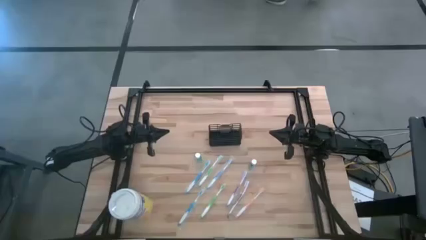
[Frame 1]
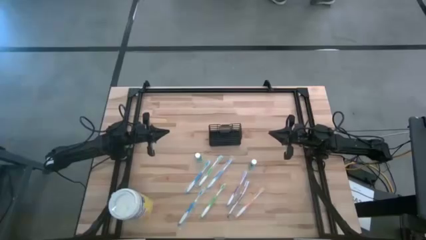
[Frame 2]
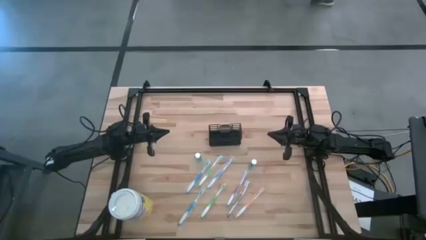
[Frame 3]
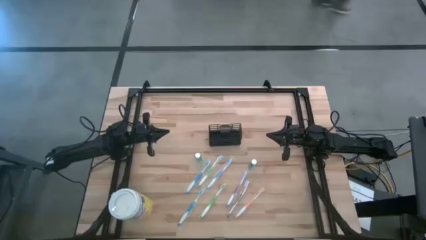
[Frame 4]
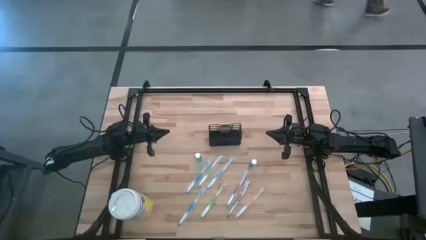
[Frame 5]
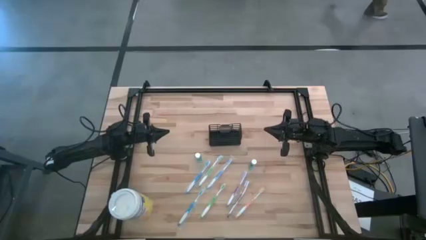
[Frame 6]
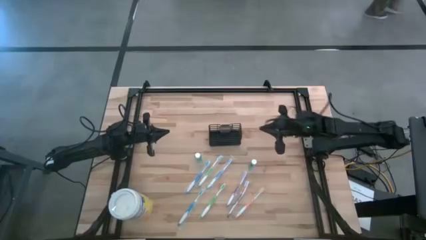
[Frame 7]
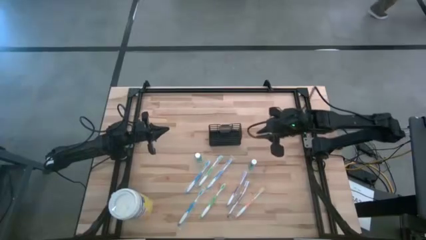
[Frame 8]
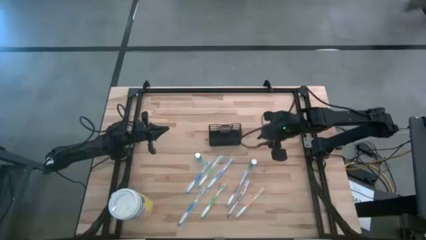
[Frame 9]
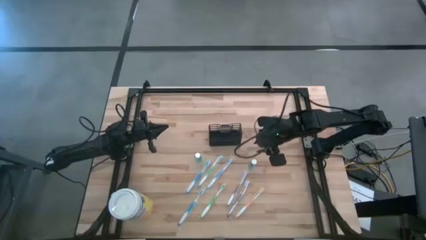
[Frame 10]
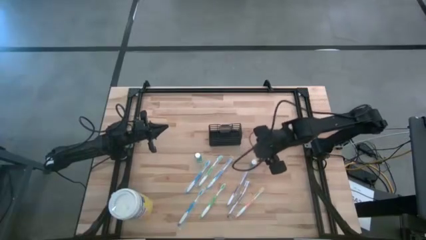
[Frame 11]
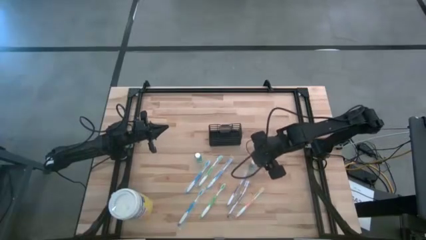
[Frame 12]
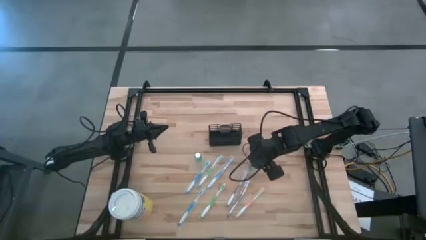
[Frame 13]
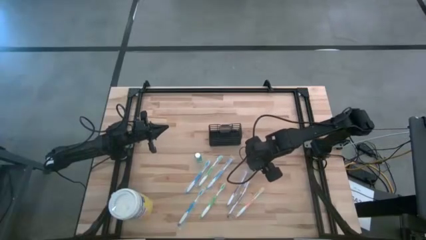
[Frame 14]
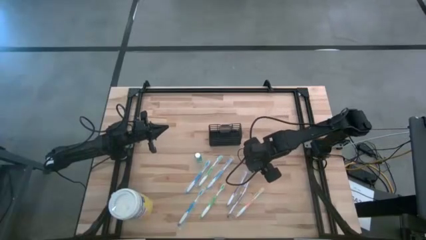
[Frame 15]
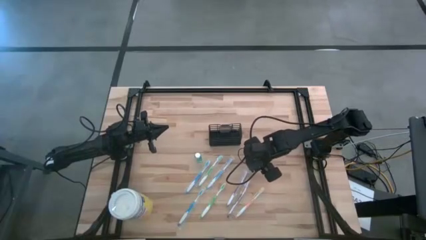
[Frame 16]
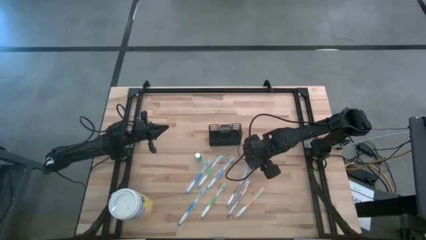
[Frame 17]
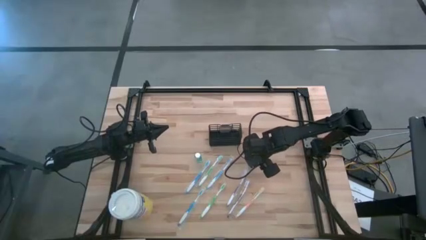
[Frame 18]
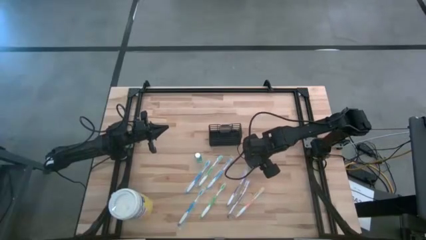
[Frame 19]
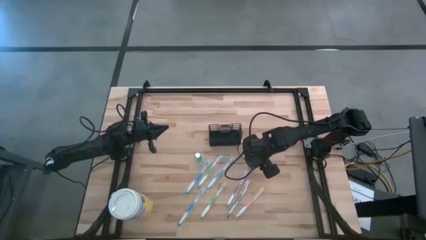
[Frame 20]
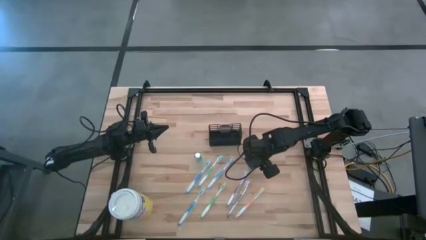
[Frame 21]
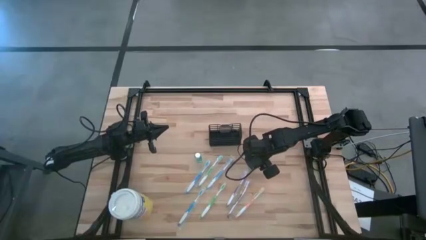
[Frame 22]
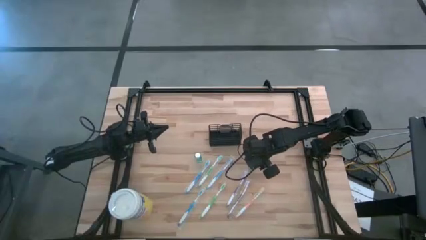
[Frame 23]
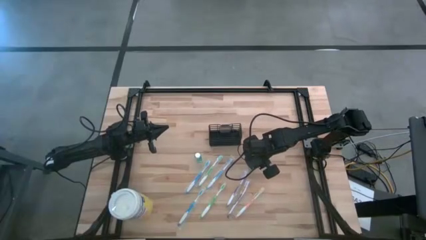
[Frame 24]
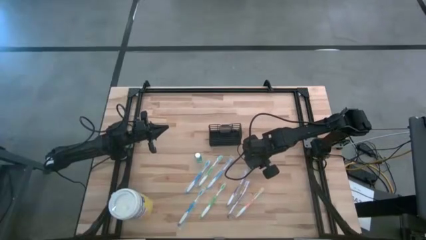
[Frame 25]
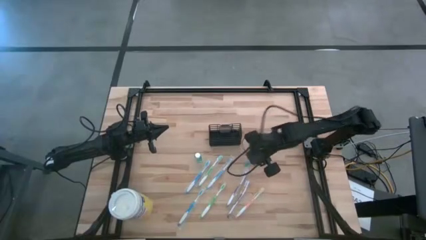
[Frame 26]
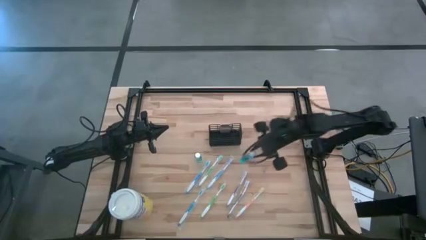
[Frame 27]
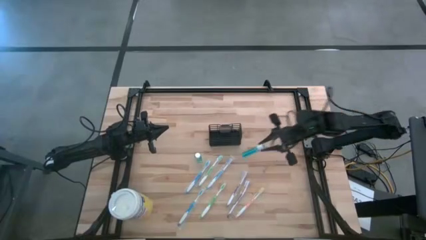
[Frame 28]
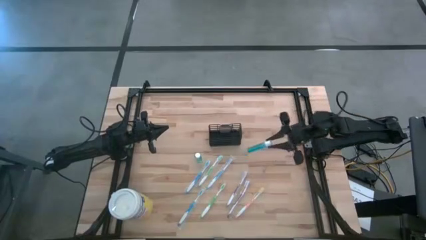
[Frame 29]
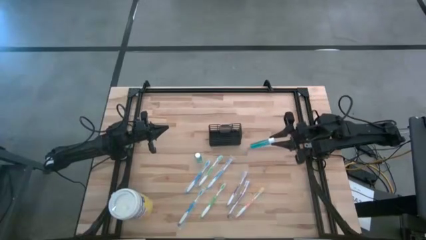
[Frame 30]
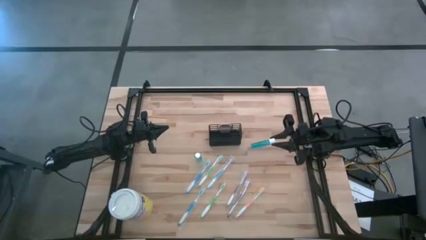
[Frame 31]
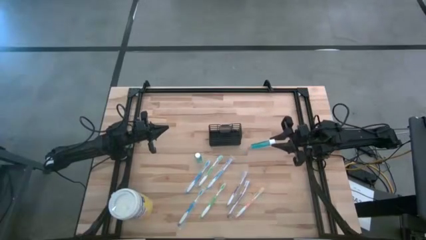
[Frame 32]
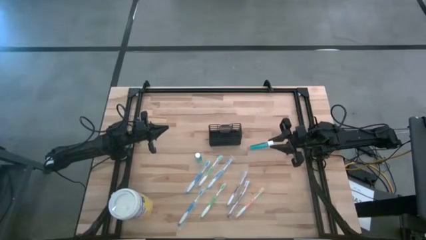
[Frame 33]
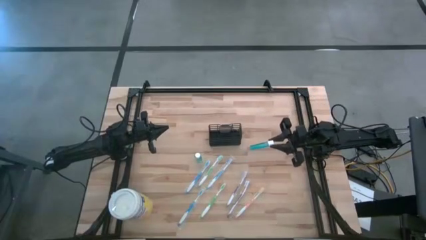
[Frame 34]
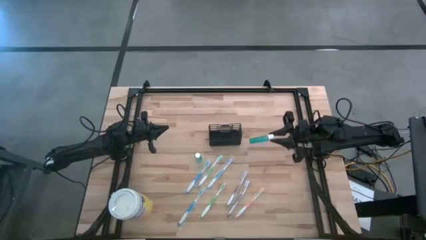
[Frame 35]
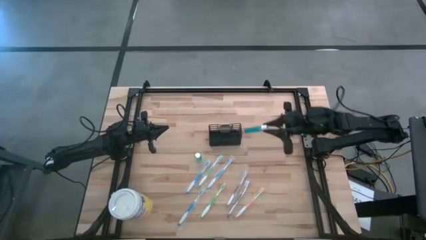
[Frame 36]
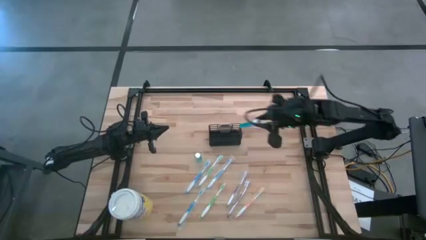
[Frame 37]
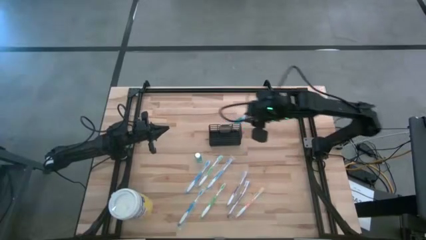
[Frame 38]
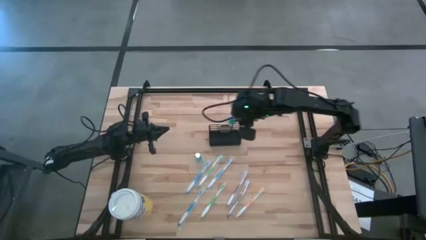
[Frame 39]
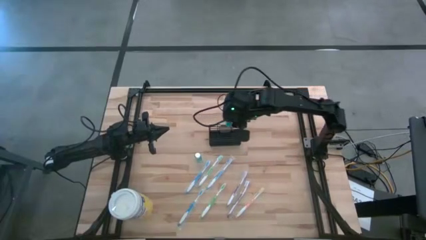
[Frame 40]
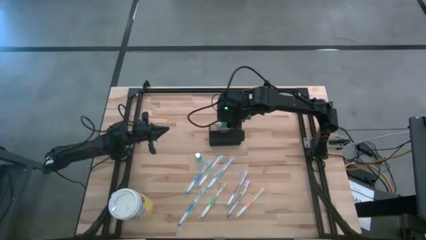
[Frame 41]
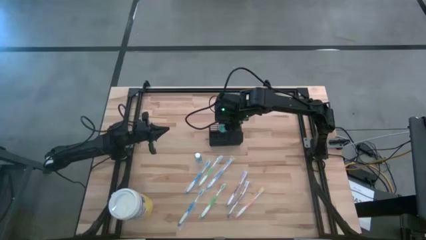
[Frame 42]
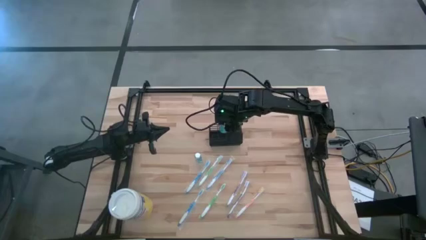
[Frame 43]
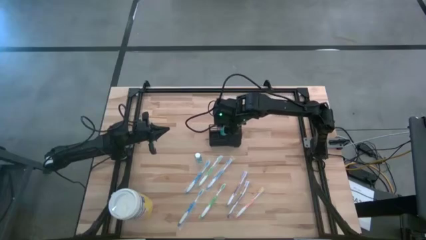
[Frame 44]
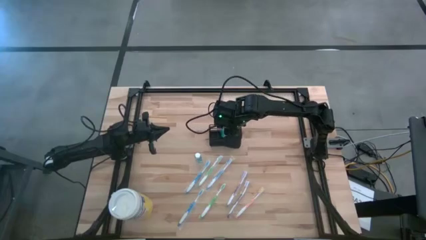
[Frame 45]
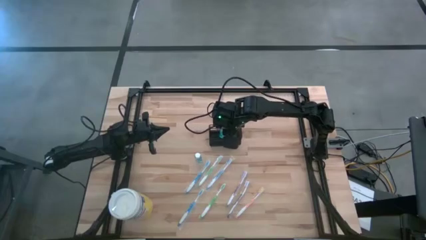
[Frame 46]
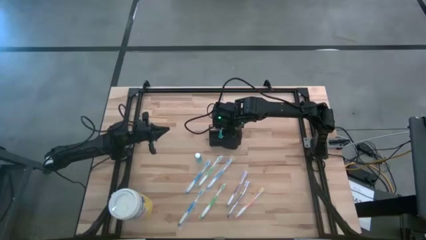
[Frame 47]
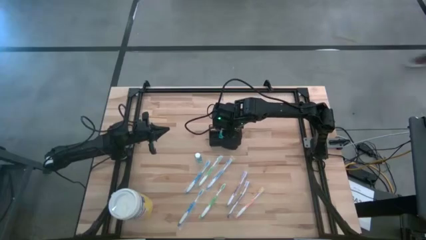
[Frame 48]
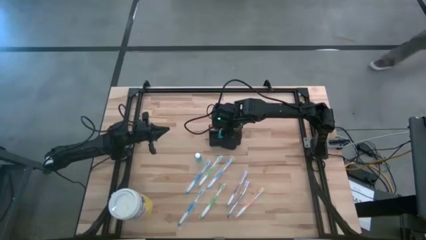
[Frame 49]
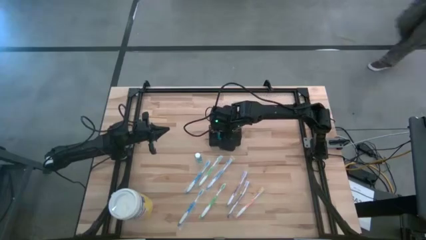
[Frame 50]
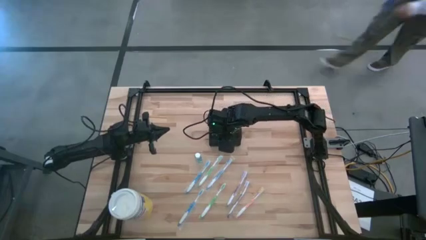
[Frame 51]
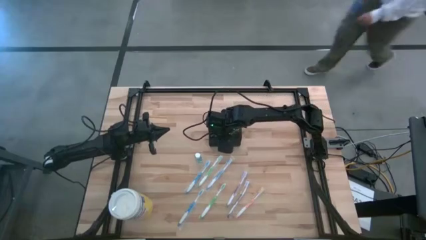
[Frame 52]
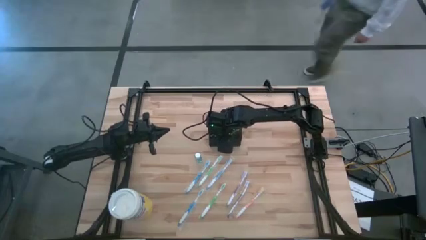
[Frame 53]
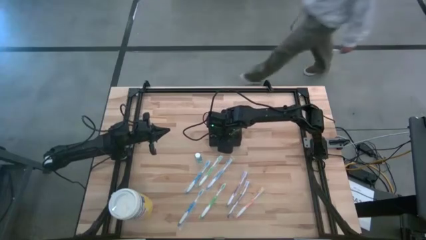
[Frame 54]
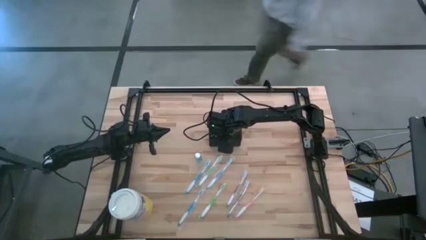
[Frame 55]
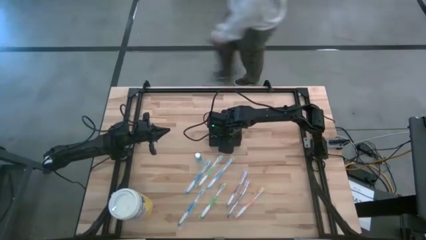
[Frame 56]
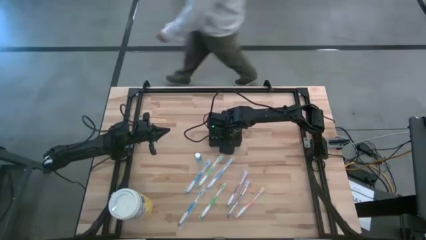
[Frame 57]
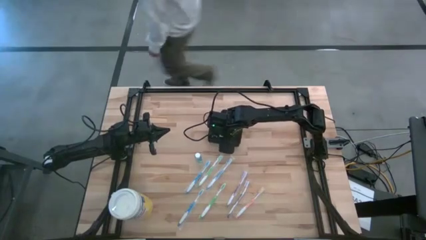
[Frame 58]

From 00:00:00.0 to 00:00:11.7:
Task: Pick & Place toothbrushing station
Put the right blue mouthwash bottle into the wire organizer

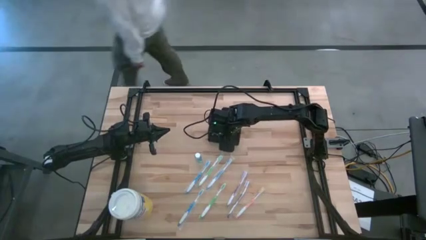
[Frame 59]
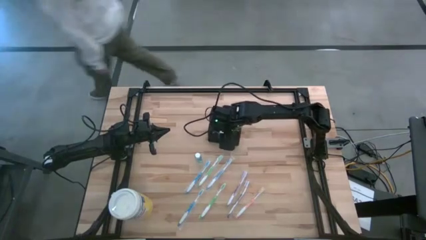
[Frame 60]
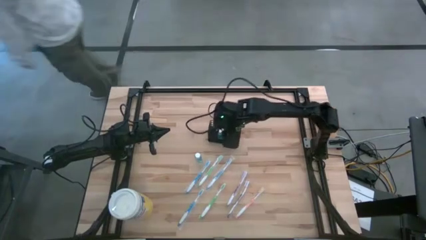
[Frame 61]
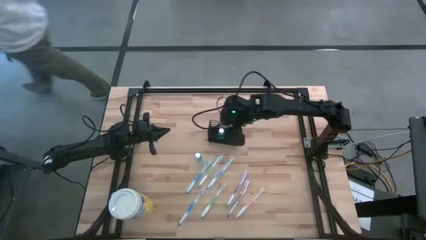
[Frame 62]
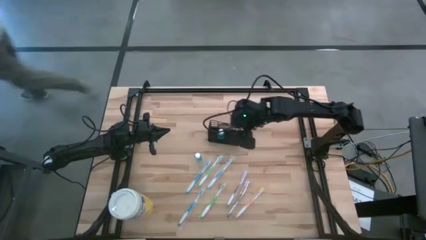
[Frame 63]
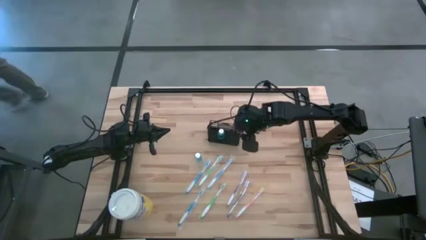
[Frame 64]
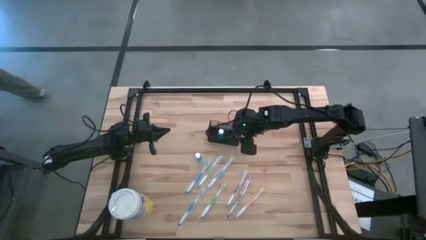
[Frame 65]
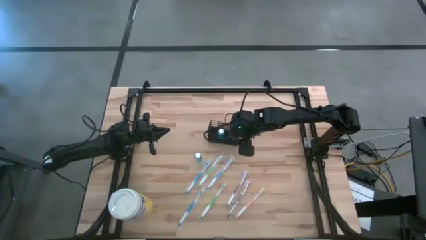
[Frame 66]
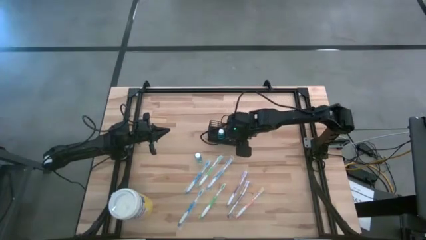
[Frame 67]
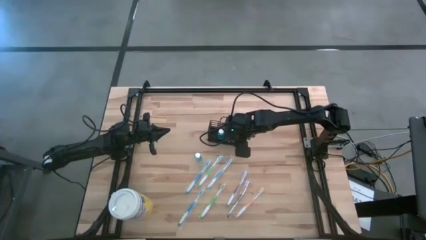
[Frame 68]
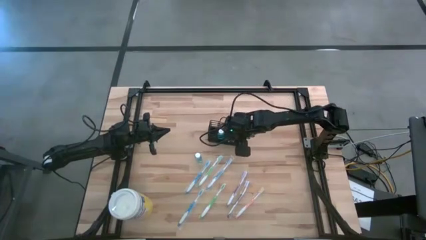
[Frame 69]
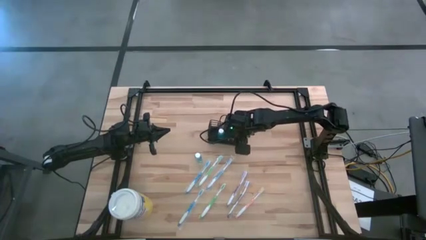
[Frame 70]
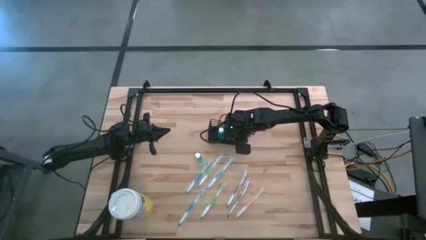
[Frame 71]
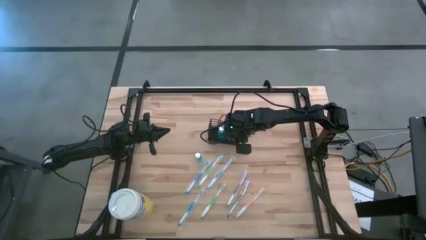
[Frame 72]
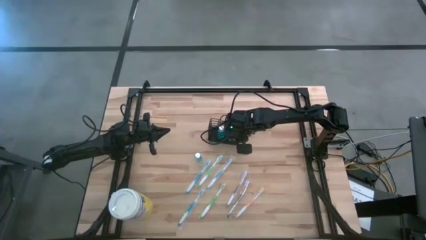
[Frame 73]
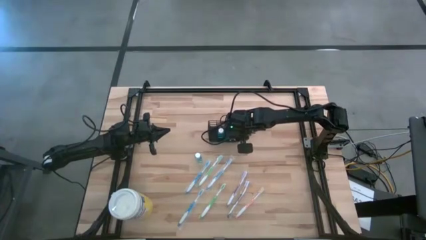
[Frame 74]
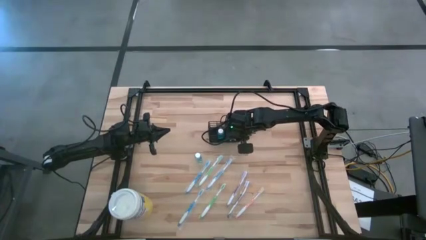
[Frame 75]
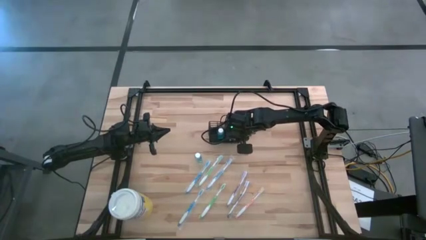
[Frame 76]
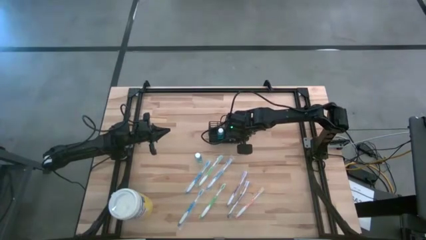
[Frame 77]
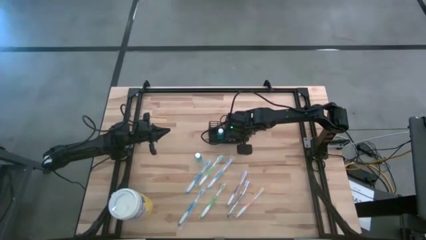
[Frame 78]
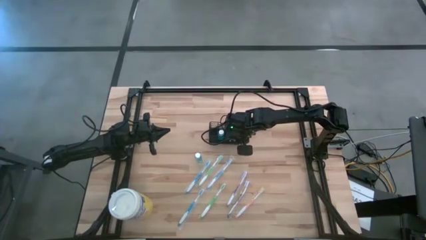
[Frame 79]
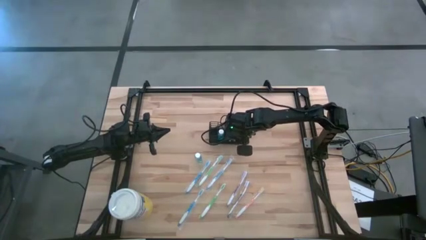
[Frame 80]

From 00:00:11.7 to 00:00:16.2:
Adjust the wire organizer on the table
